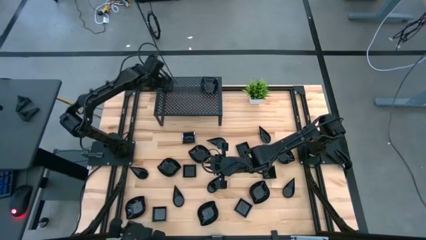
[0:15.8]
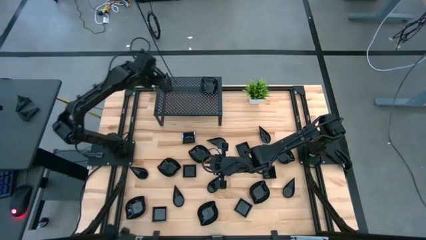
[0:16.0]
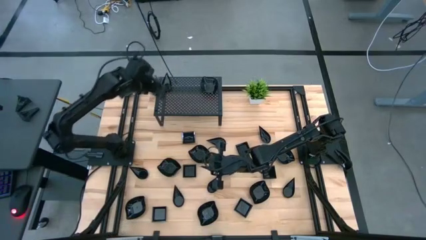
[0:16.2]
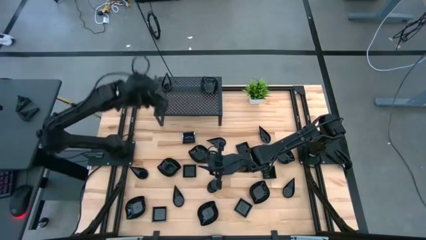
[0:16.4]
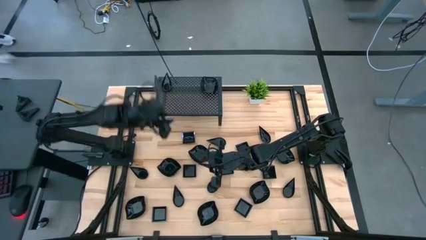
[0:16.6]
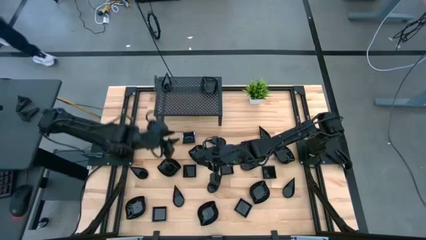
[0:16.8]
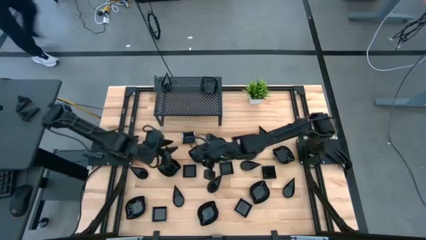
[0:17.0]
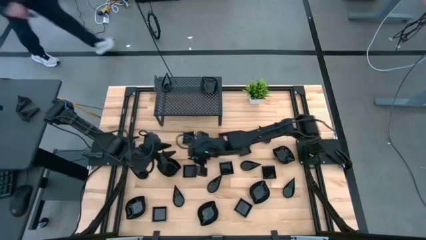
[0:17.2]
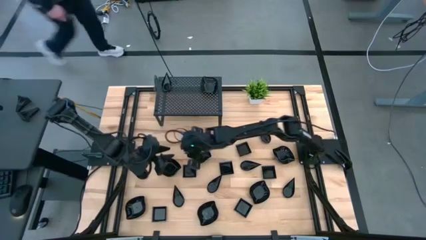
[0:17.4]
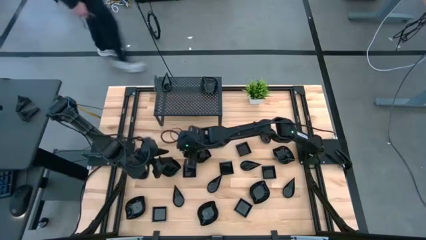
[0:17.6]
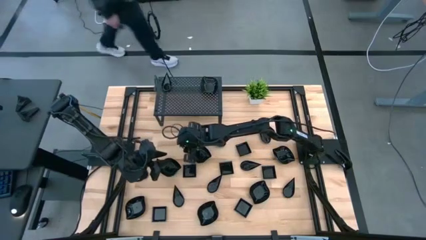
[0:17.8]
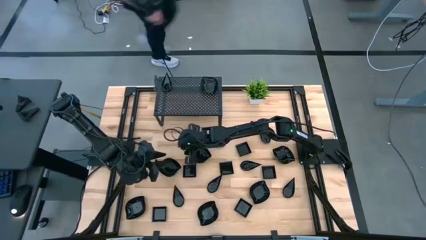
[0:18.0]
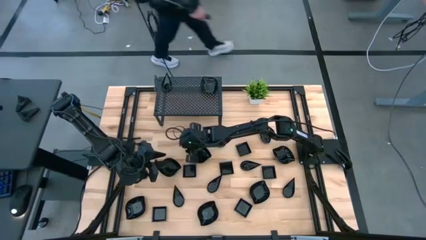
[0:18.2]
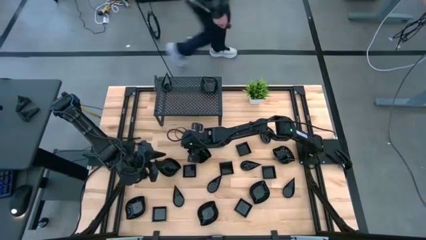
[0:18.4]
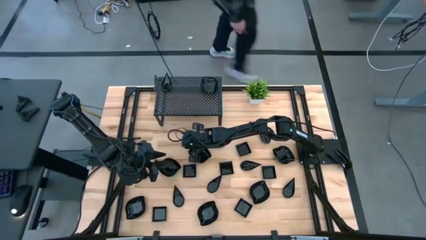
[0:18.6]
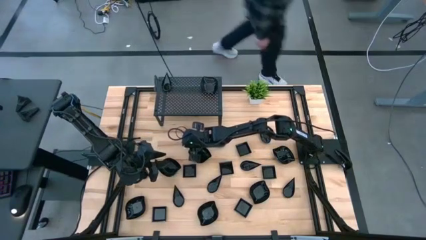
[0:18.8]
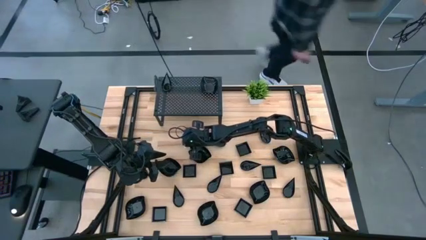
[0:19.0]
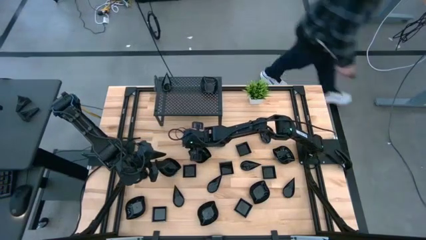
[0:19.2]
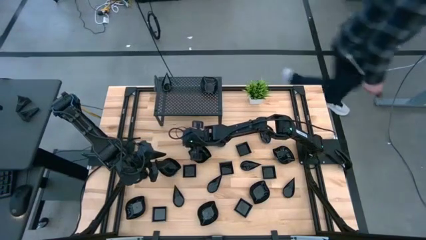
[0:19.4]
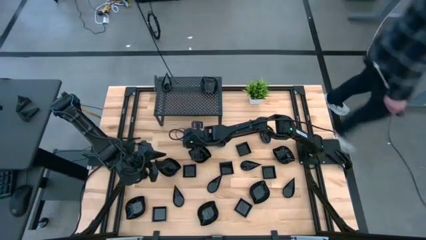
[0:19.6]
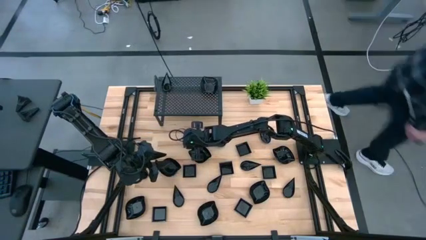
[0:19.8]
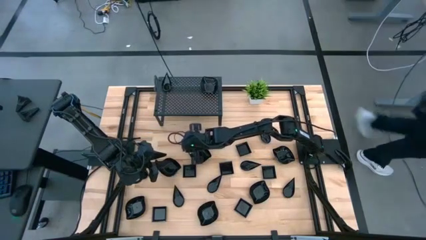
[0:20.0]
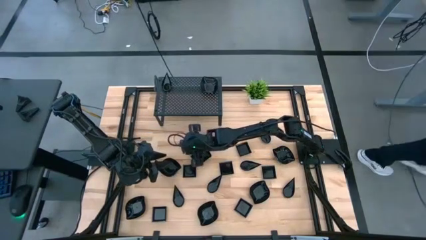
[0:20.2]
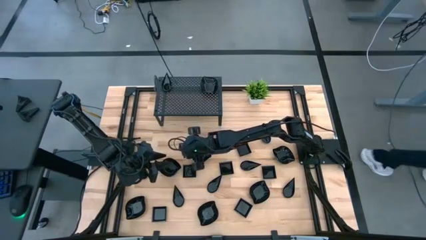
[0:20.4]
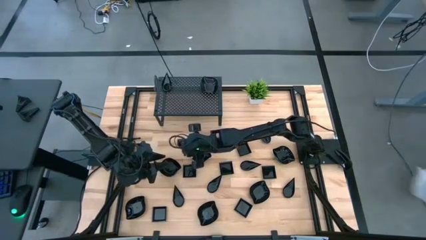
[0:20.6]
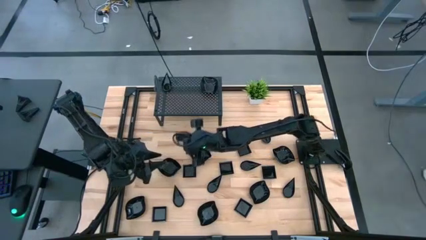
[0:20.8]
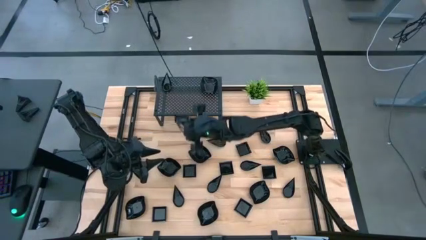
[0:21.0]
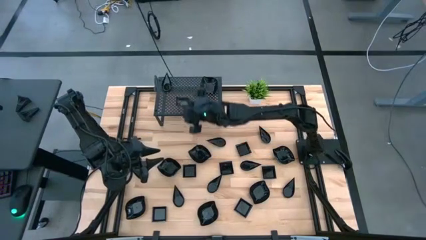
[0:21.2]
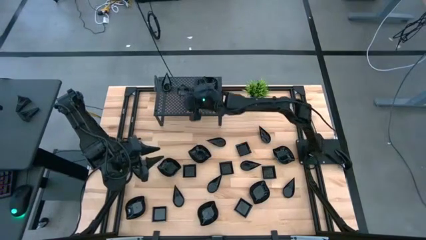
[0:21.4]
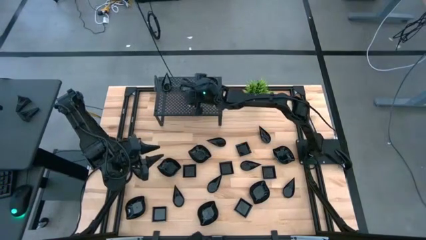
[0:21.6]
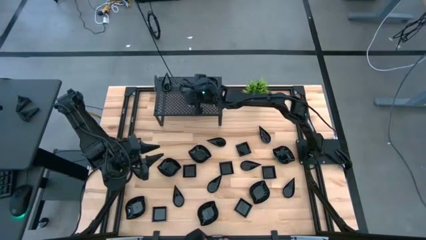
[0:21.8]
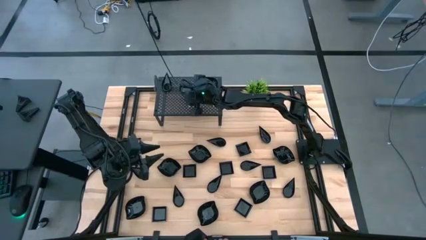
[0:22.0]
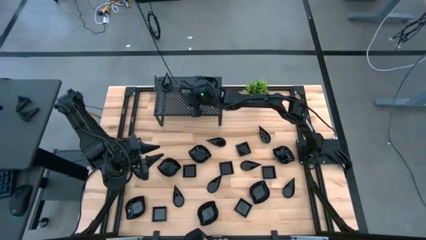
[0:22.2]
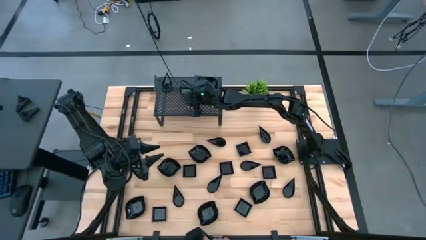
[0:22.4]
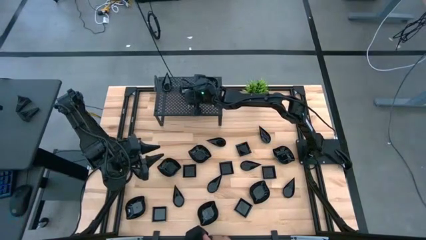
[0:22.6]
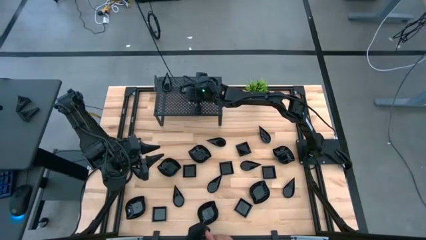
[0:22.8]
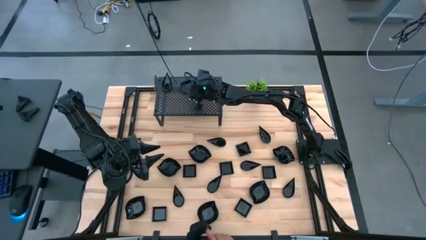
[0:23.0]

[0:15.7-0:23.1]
Task: Pick & Place Mini shaped plates
Put the black square plate on the shelf

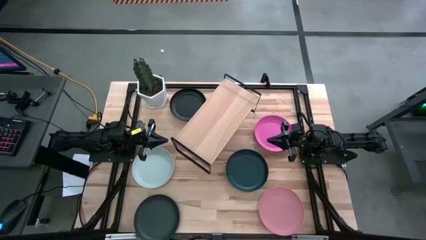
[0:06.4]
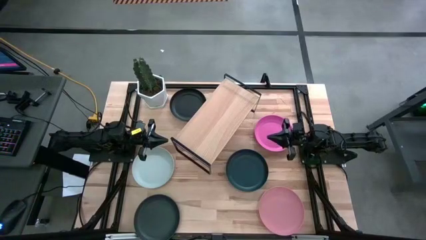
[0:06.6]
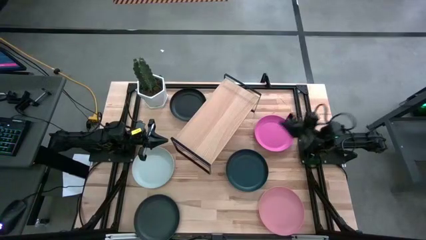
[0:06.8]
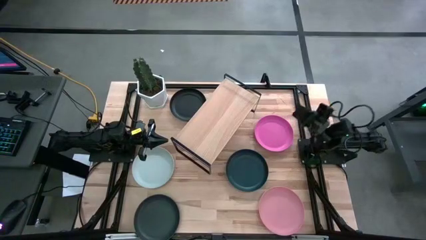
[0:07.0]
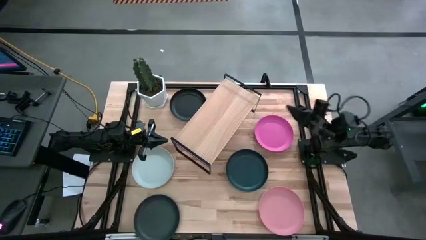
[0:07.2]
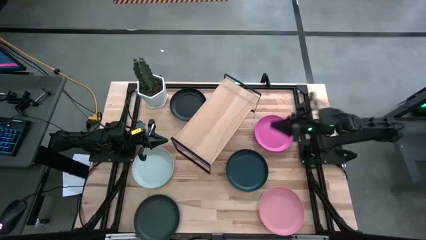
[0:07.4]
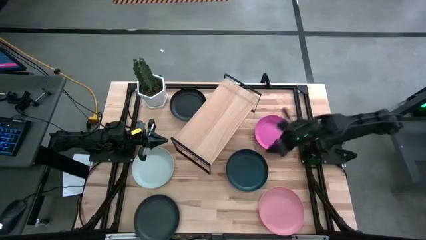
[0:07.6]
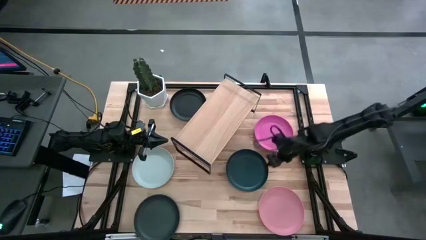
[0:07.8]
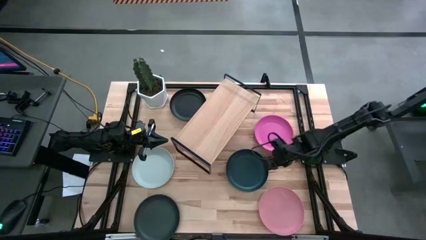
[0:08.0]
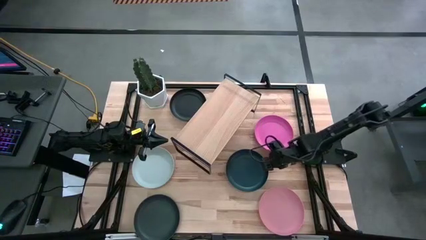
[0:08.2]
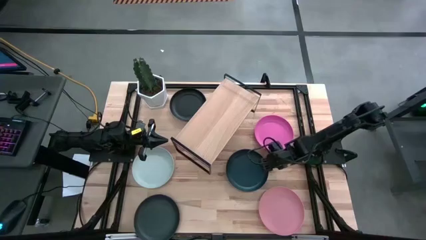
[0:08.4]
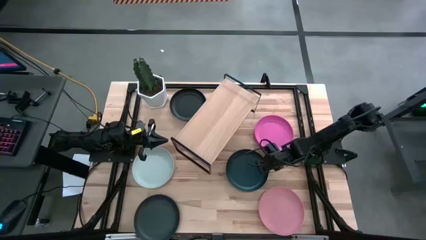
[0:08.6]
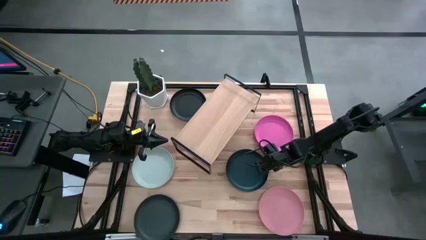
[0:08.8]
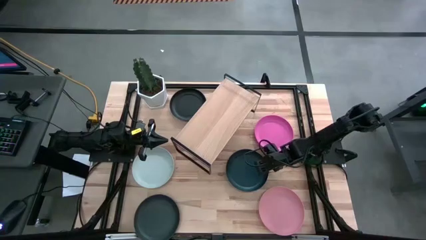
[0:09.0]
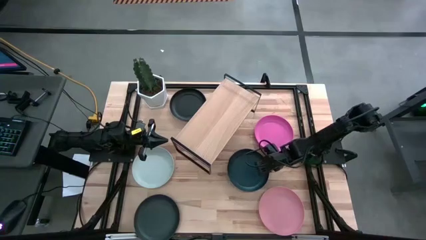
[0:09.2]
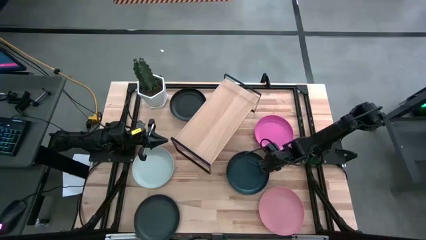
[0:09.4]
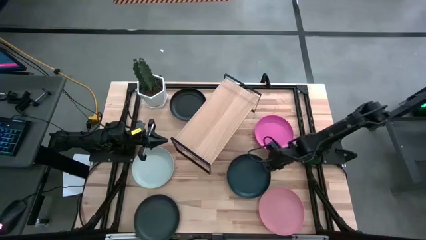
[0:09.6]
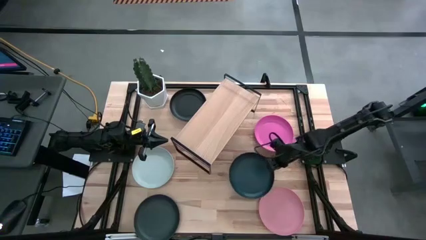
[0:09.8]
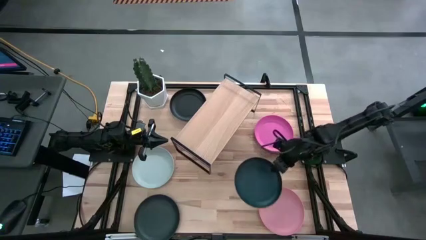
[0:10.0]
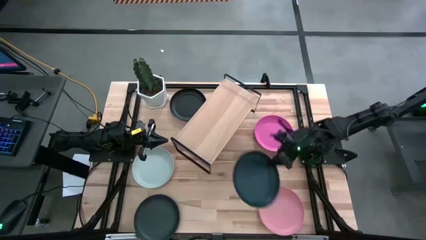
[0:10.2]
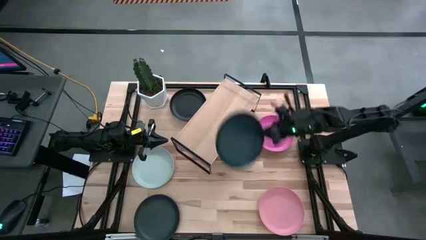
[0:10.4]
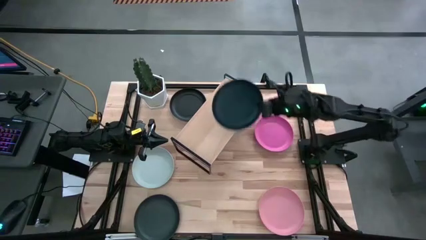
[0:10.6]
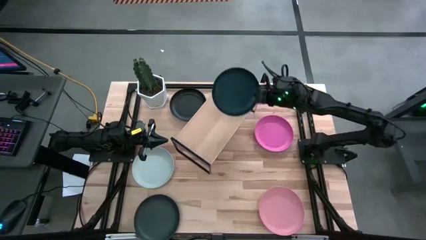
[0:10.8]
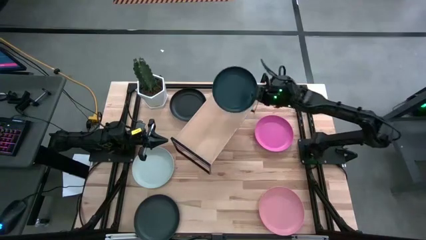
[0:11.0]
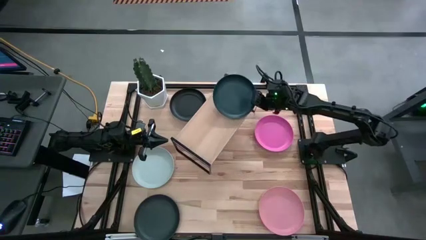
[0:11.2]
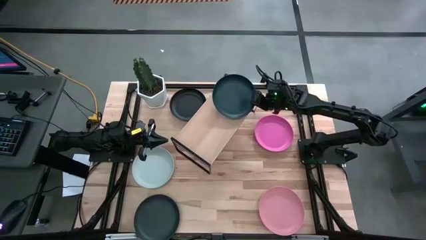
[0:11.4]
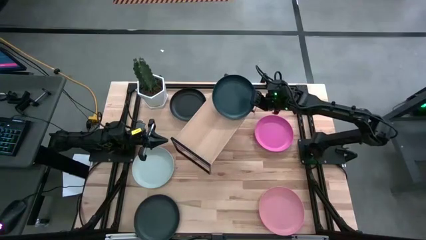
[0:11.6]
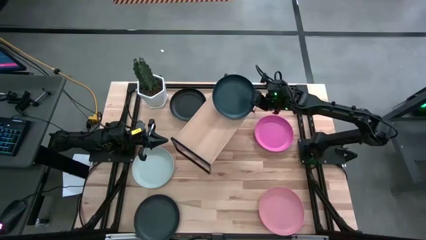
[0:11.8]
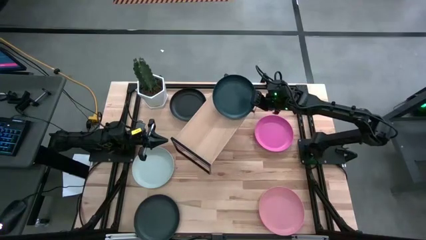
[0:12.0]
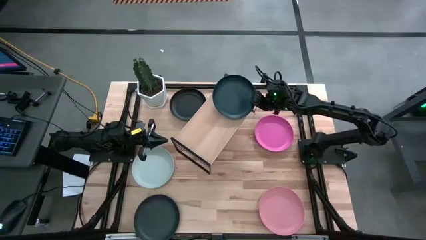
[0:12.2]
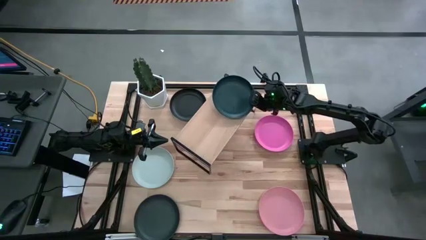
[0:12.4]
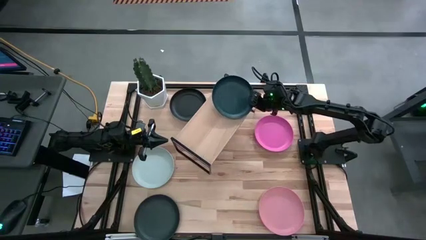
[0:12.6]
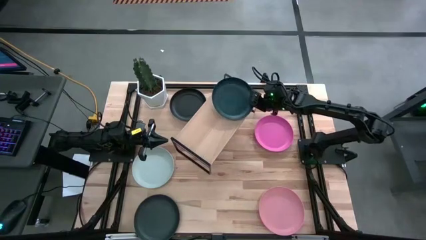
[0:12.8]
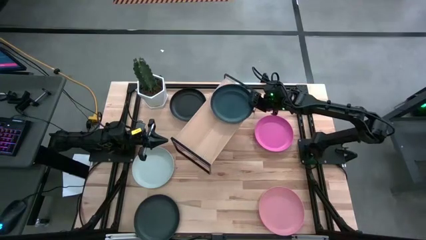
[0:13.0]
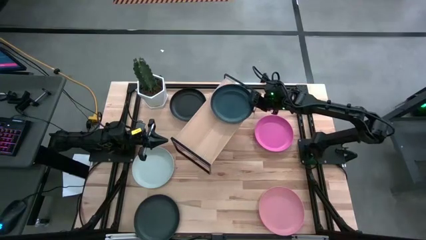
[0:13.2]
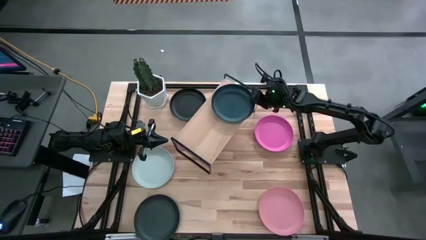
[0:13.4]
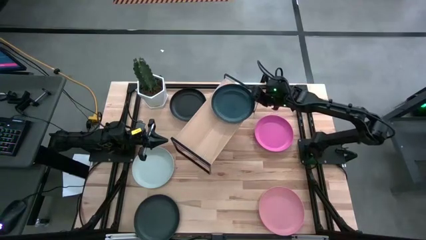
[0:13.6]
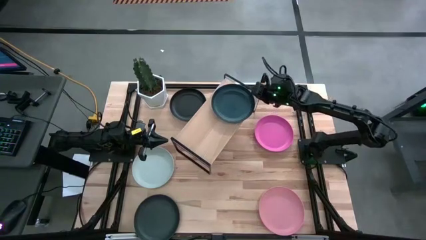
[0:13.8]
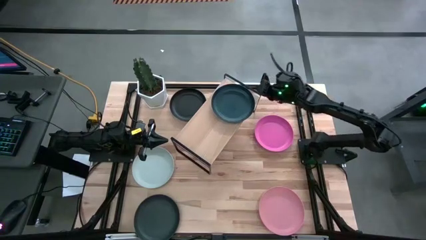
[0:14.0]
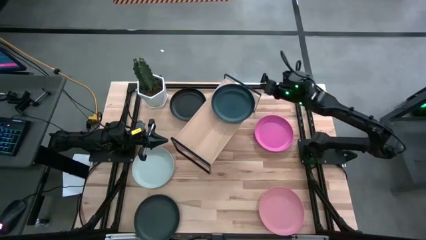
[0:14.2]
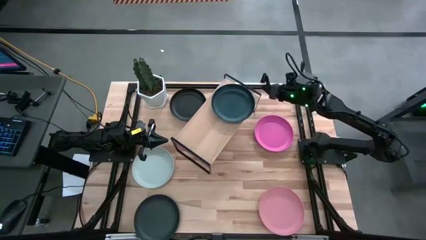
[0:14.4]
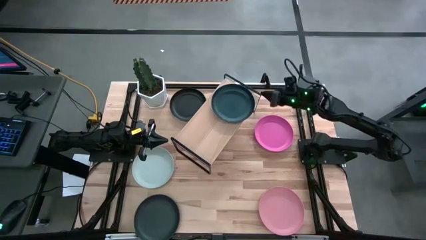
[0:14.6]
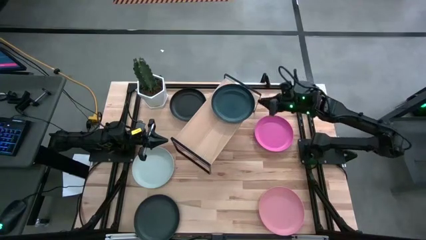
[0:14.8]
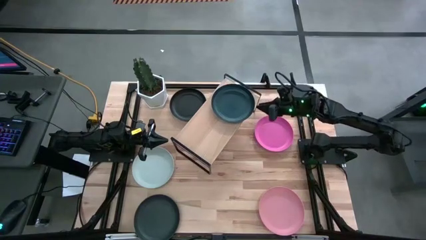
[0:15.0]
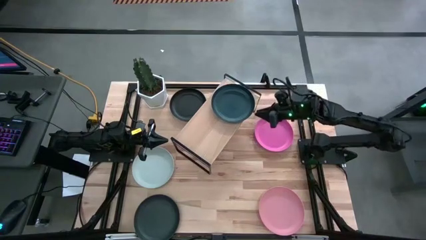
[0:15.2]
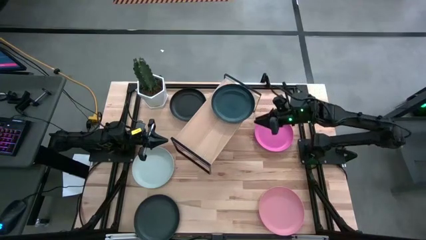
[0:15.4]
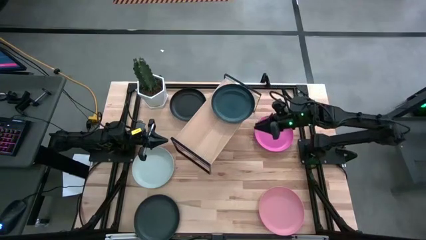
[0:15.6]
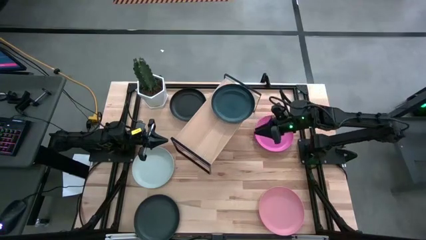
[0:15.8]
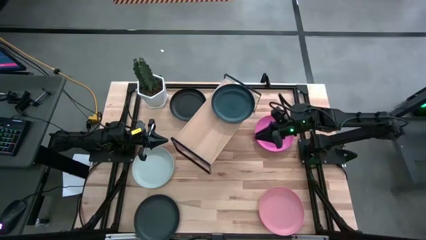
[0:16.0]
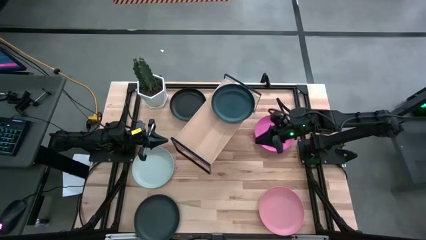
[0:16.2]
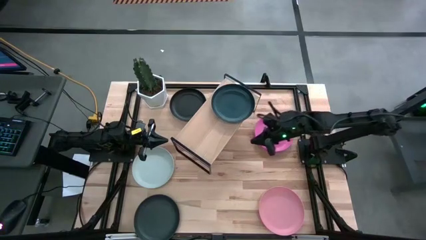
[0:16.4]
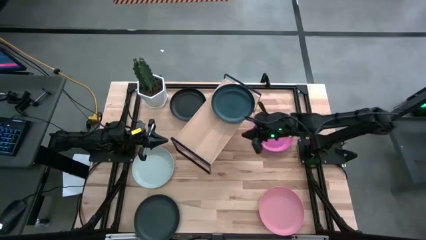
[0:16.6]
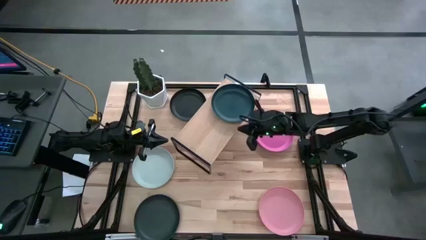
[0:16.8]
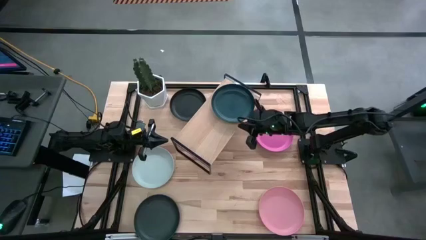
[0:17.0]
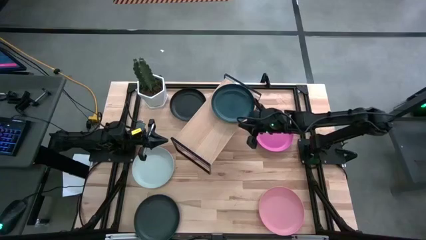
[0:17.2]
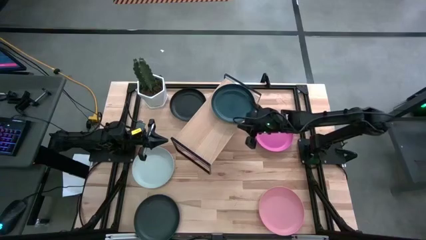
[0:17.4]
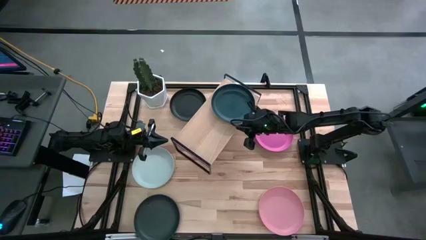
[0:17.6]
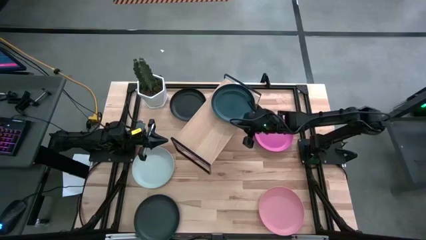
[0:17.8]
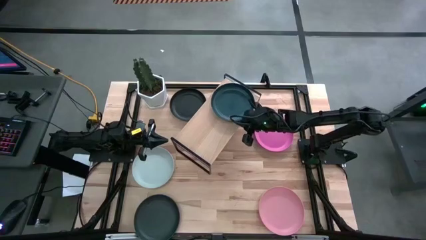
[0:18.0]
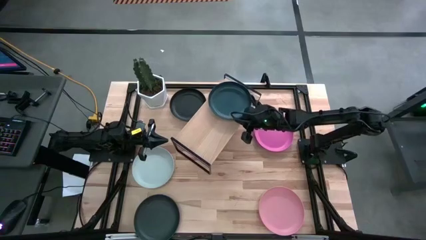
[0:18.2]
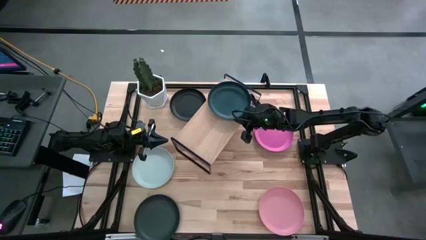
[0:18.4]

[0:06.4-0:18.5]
Task: Place and stack plates onto a shelf
Put the dark green plate on the shelf
